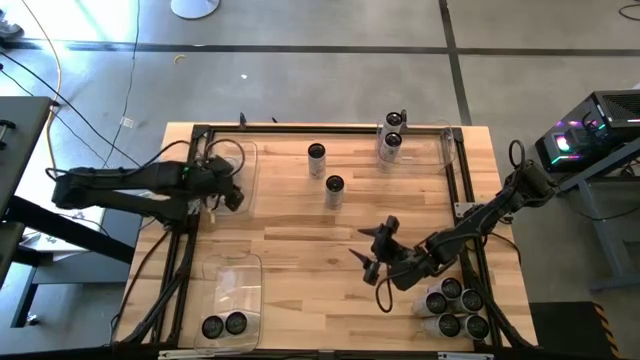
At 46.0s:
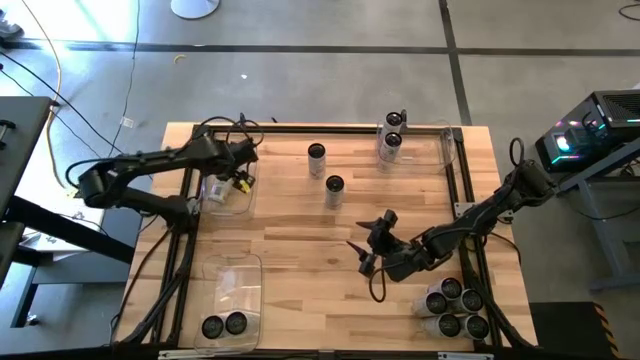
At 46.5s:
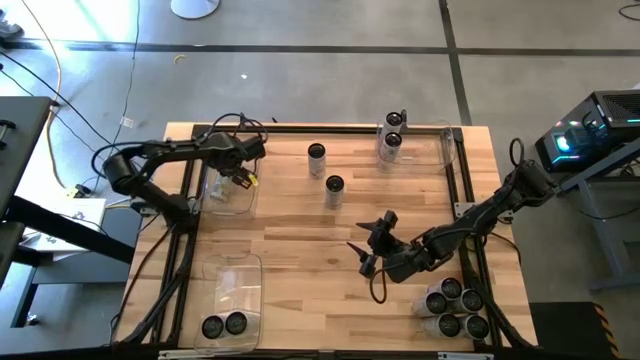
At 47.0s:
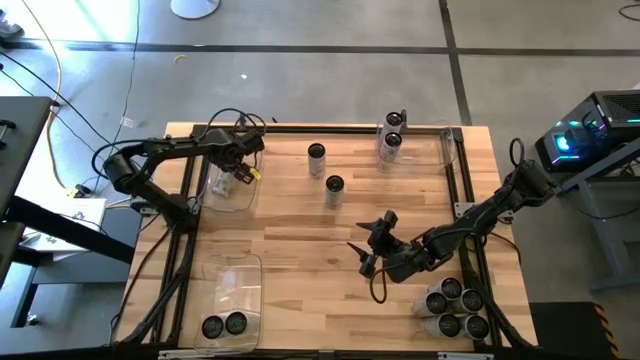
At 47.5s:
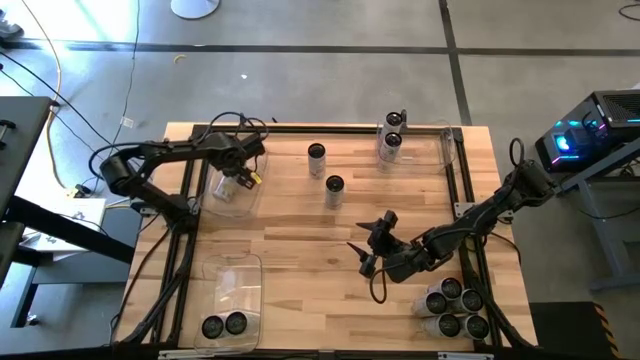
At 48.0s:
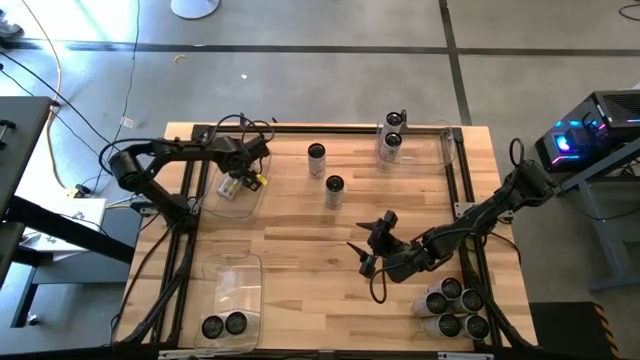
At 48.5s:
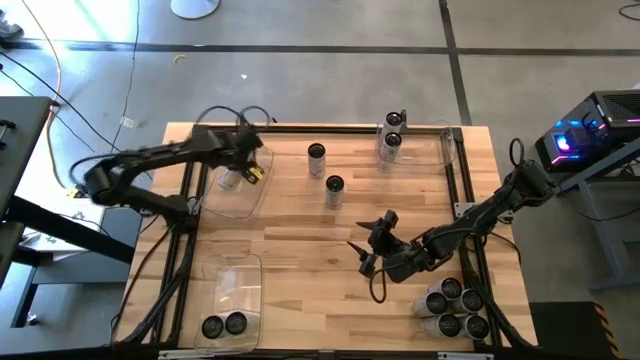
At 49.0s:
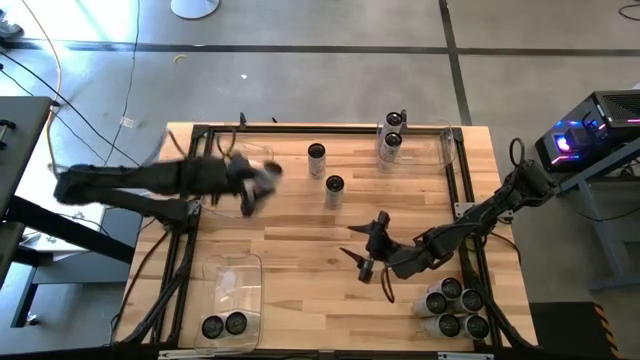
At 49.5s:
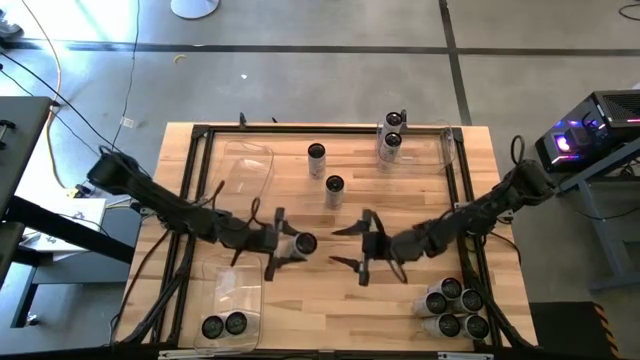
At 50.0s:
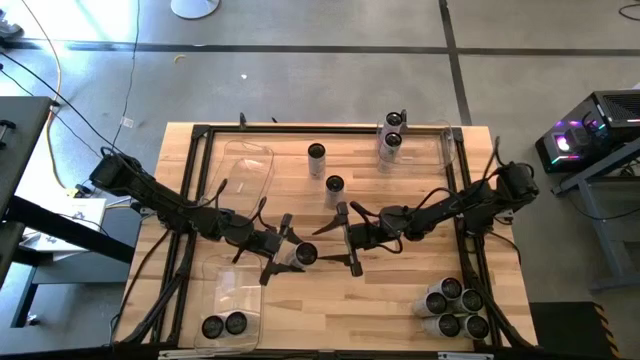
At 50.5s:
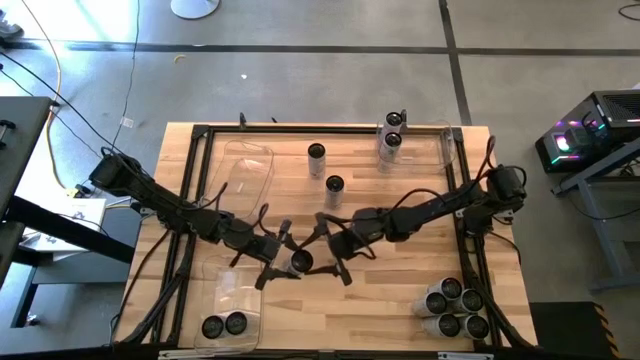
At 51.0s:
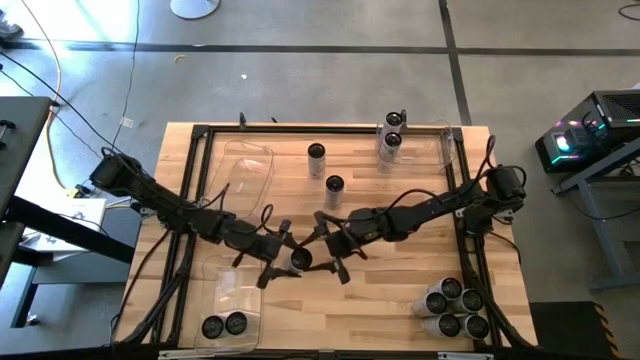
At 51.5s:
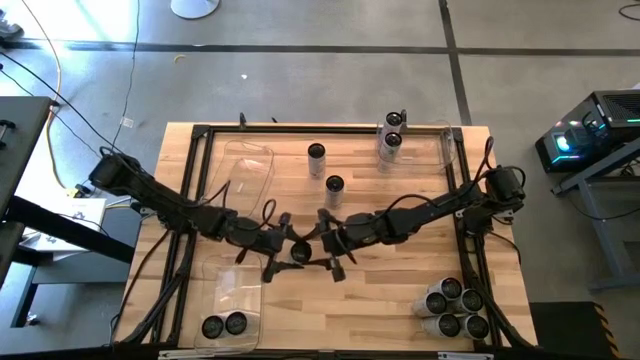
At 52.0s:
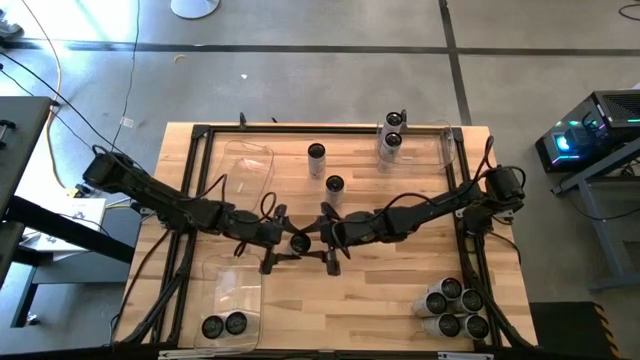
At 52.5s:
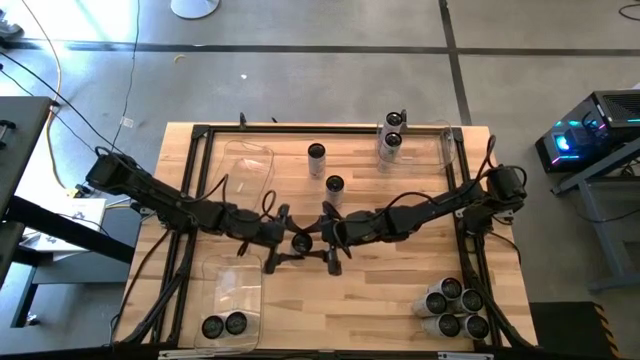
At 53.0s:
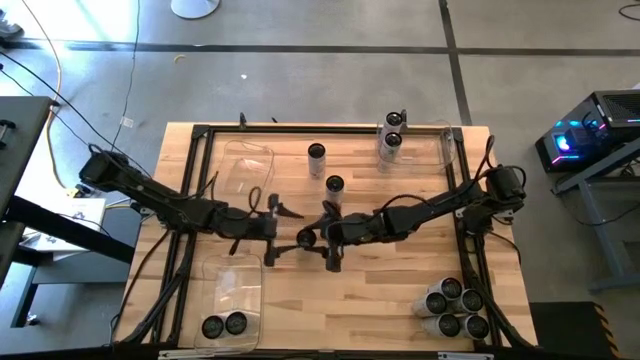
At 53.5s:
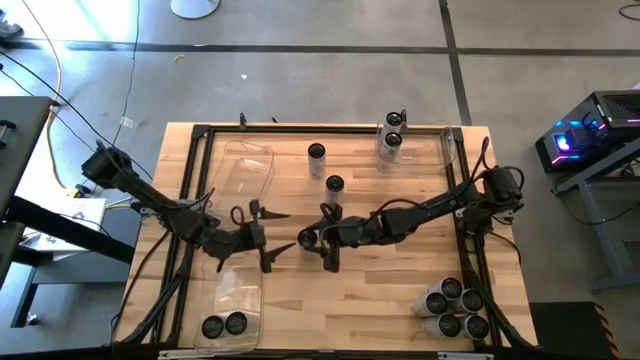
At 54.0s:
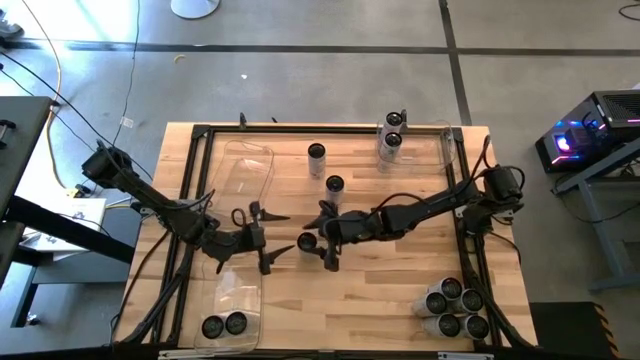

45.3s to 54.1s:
Task: Sort soda cans
Remove the white yellow soda can from the top left transparent bin

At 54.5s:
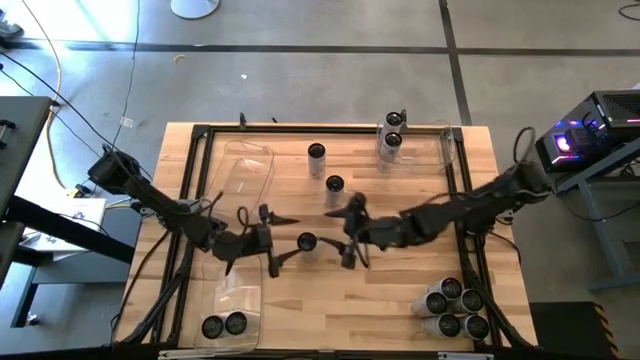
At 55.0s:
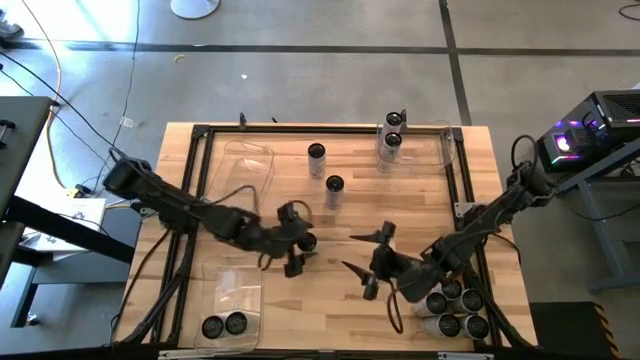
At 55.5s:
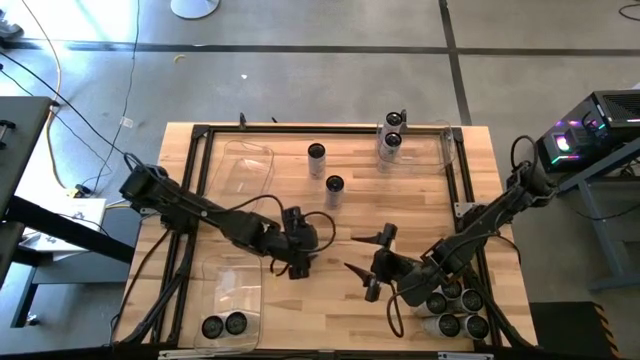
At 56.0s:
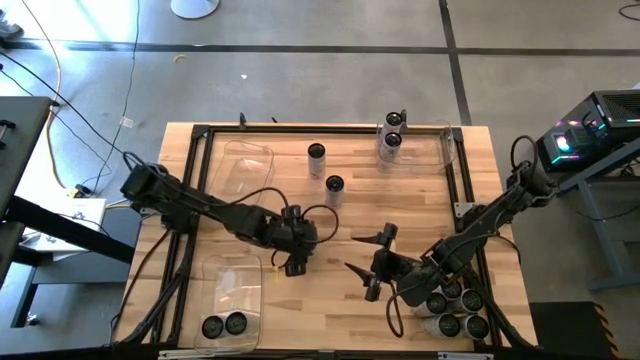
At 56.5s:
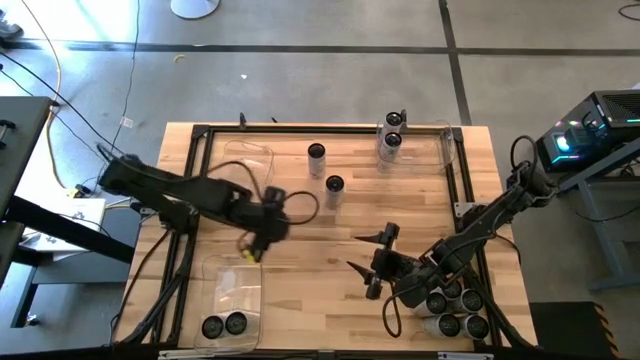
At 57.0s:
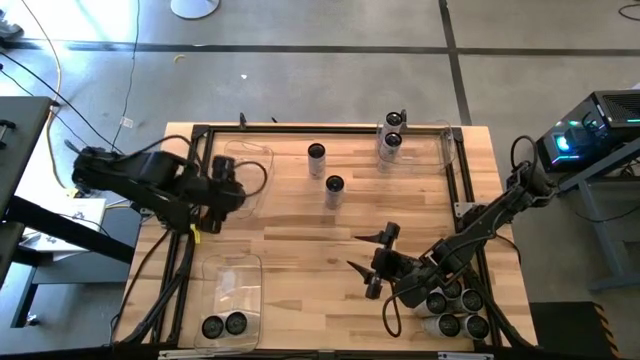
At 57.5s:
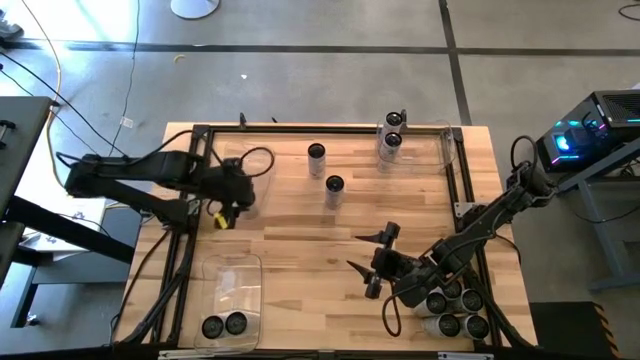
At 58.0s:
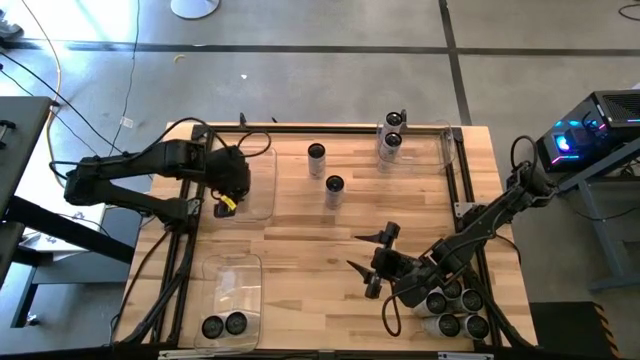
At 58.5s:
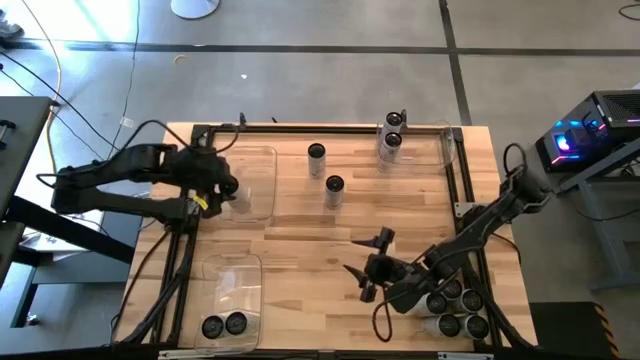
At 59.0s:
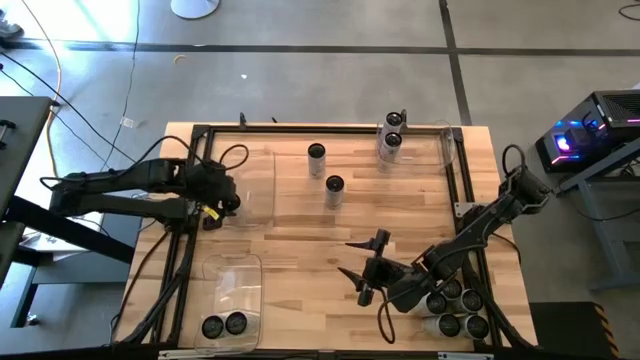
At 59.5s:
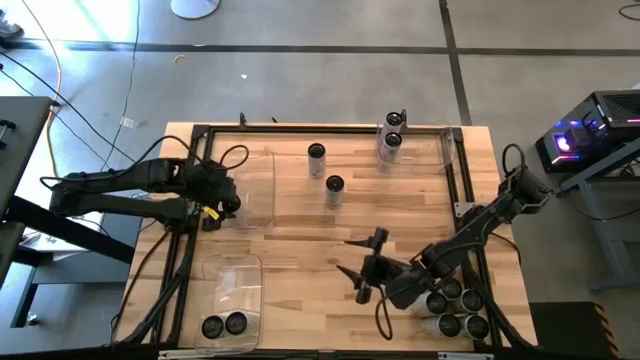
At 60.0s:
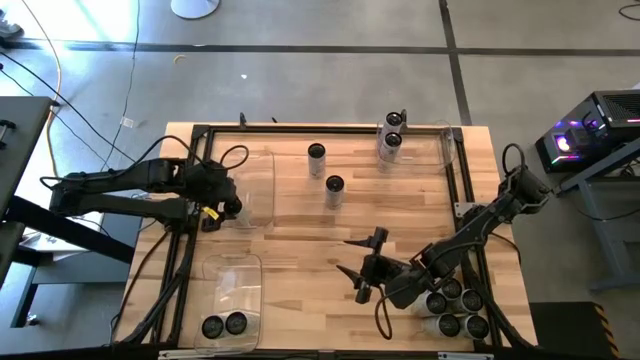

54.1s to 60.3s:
Put the white yellow soda can into the top left transparent bin

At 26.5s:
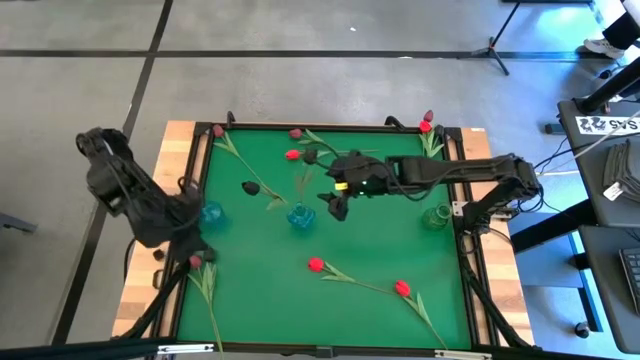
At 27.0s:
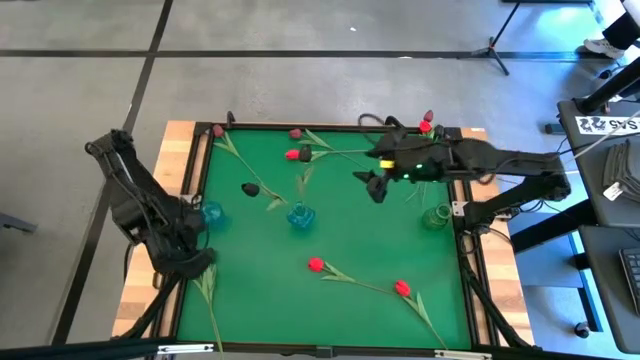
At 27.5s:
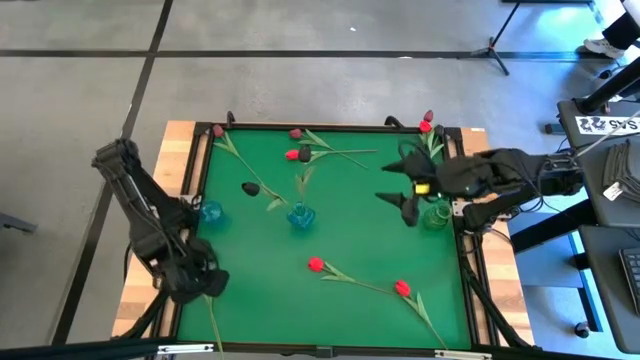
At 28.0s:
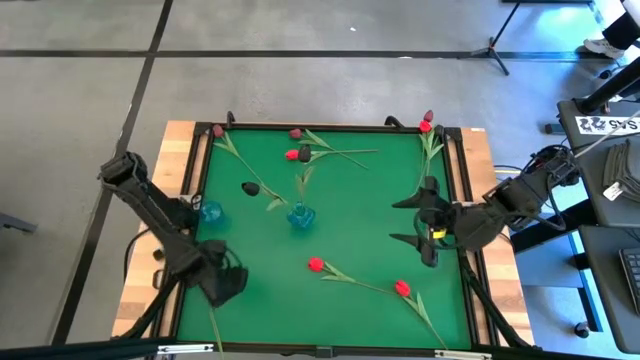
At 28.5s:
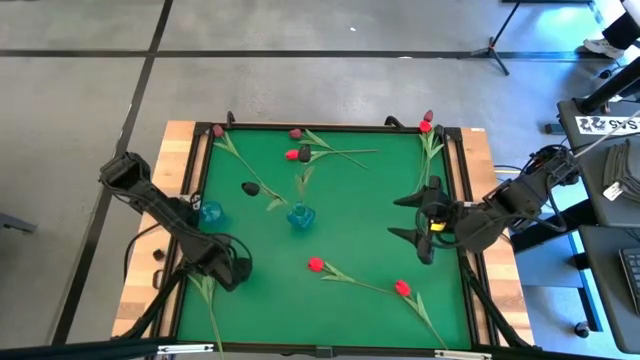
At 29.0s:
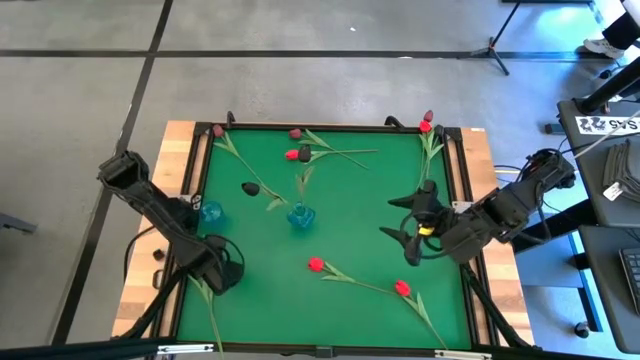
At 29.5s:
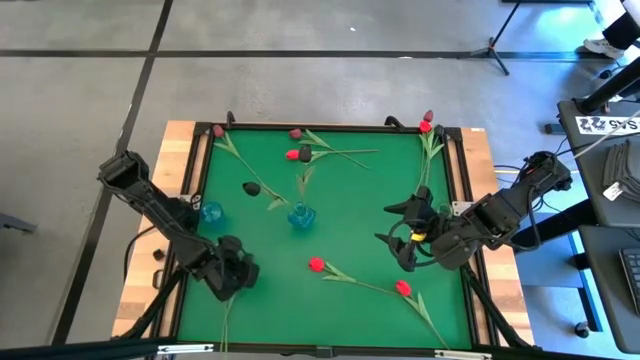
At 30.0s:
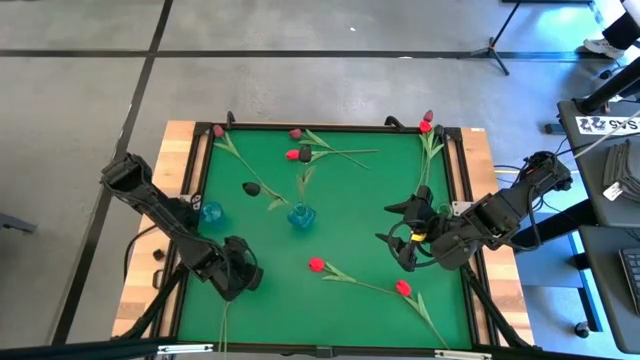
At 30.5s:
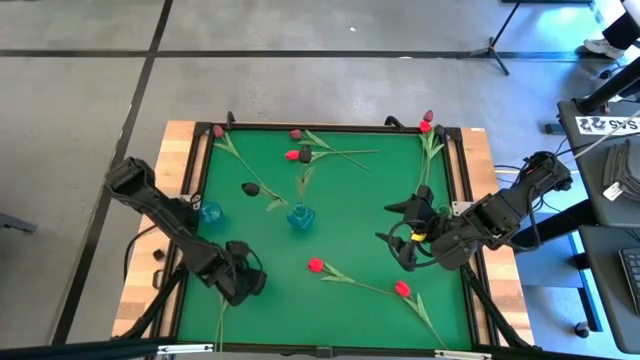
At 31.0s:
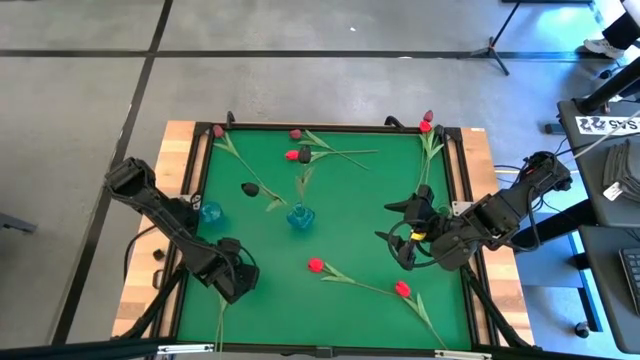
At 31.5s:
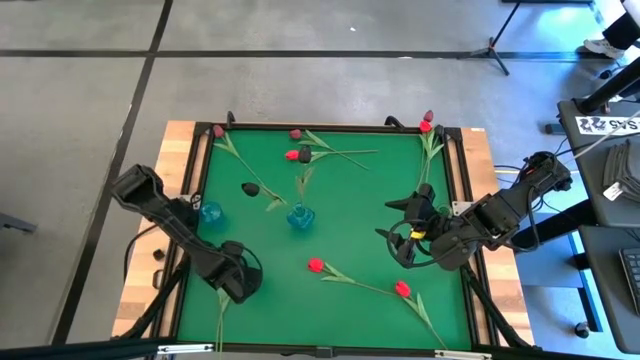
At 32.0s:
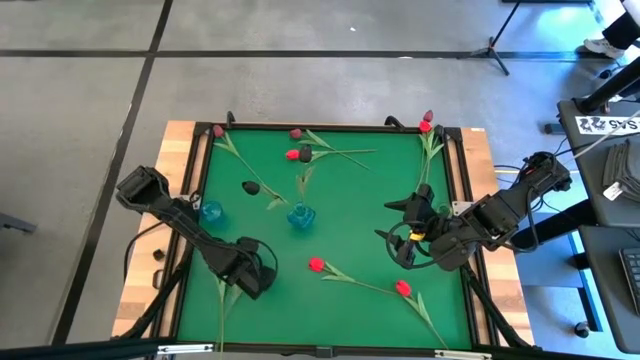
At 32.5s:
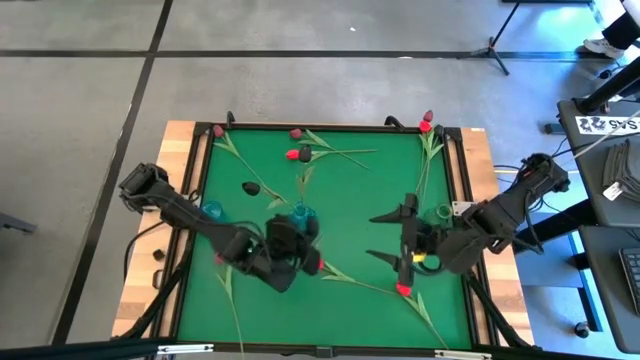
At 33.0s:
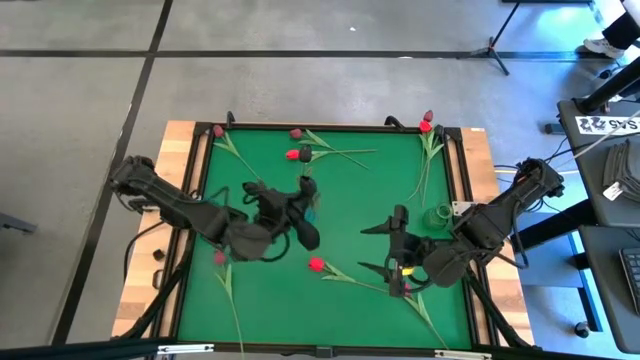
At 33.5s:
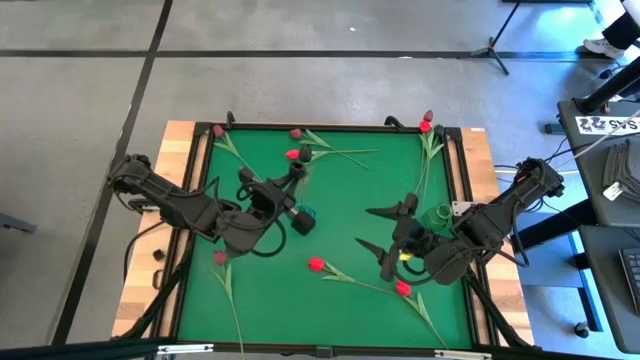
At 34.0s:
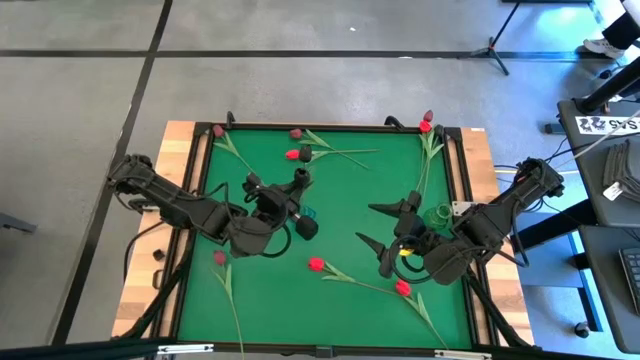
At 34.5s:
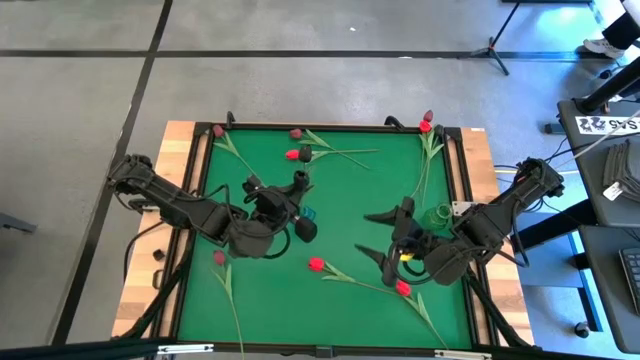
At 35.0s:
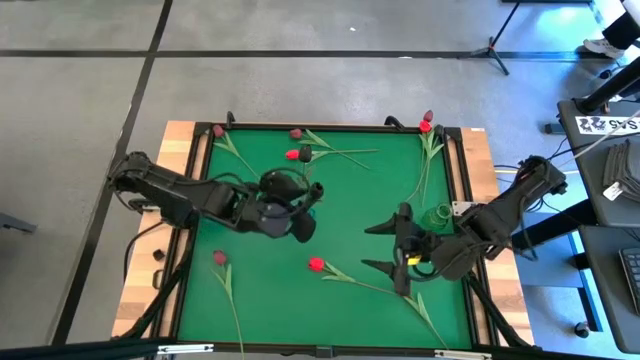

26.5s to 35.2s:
Task: Sort flowers into vase by color
Put the bottom black tulip into the right blue vase
